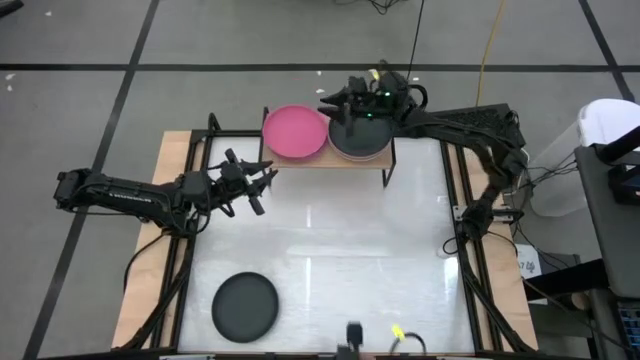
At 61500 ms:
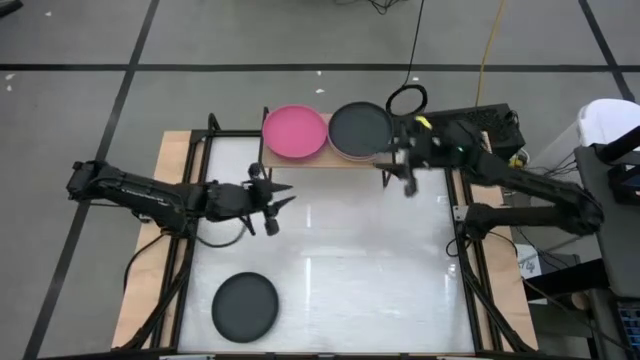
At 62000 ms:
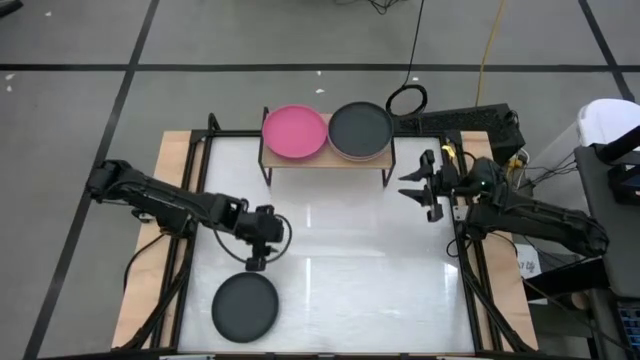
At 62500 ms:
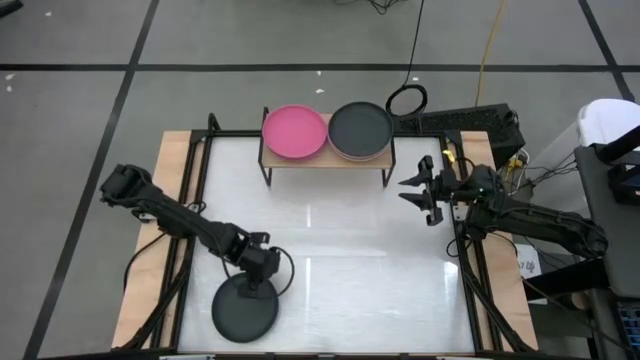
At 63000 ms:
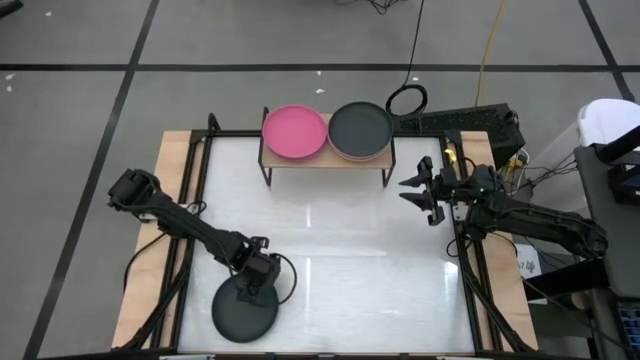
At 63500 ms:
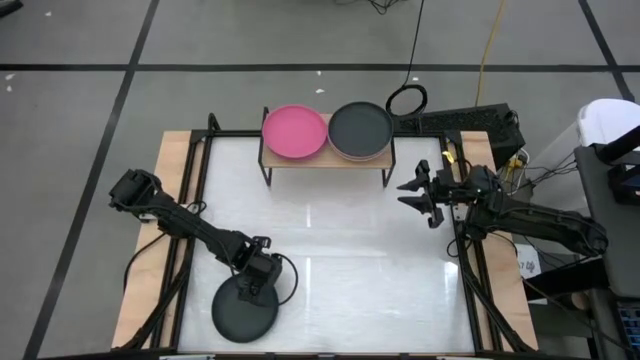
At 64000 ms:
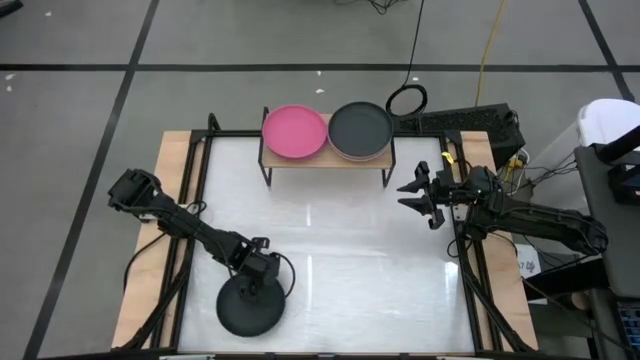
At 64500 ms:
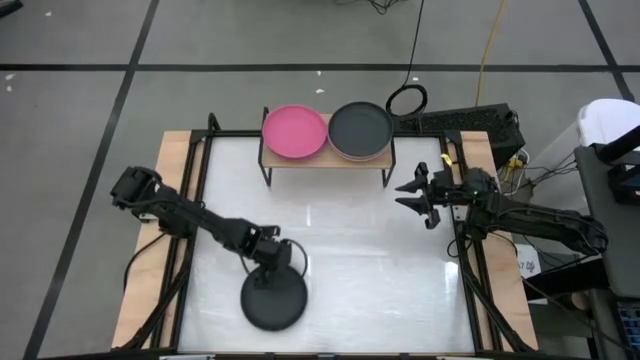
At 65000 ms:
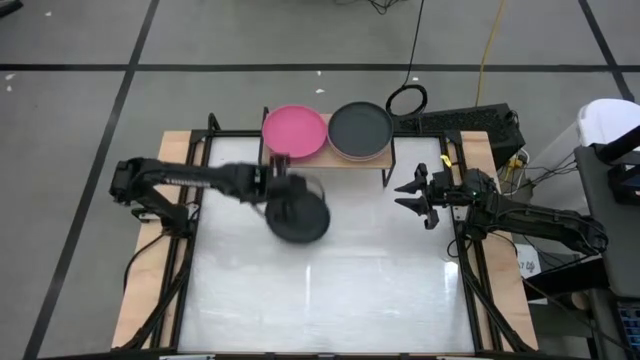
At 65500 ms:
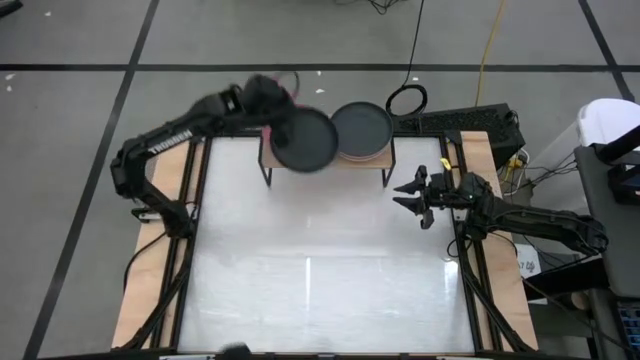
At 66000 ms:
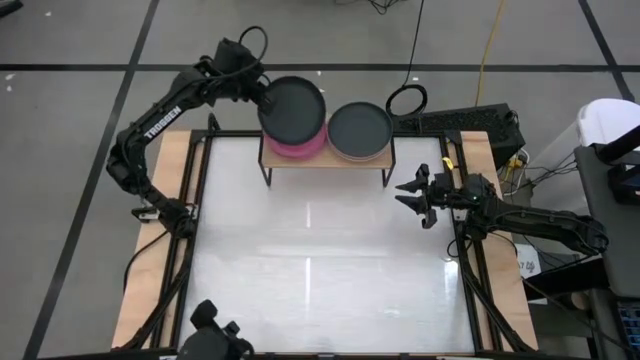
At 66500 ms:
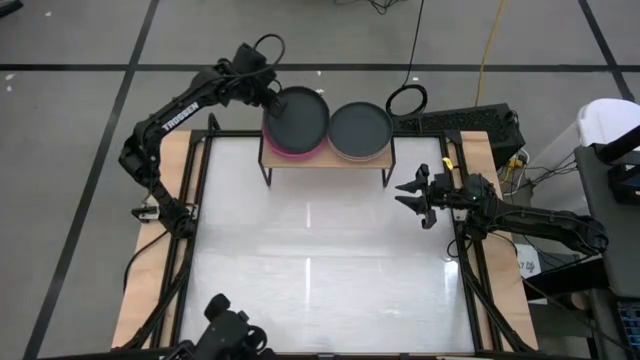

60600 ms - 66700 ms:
Task: Place and stack plates onto a shelf
Stack the black plate on top of the pink plate on the shelf

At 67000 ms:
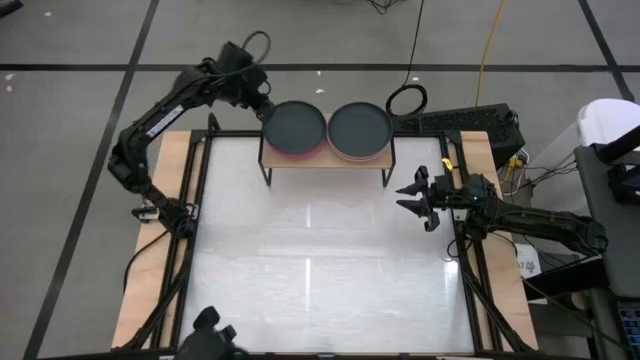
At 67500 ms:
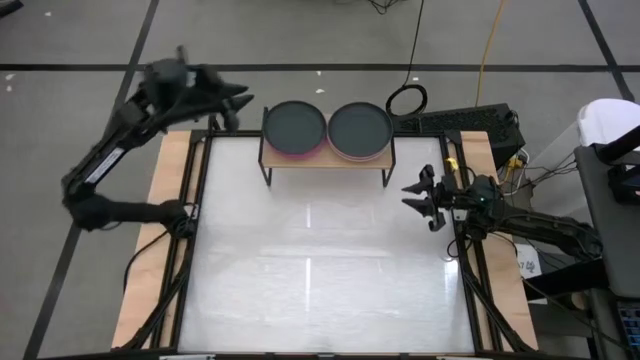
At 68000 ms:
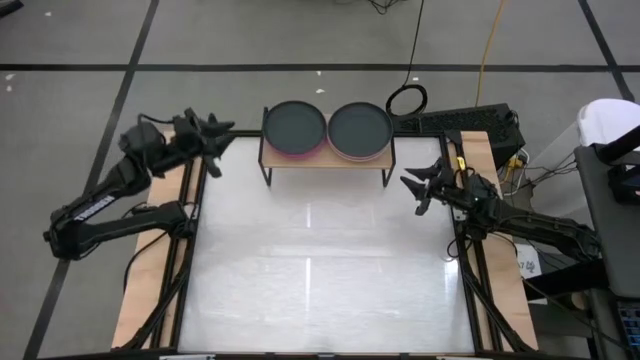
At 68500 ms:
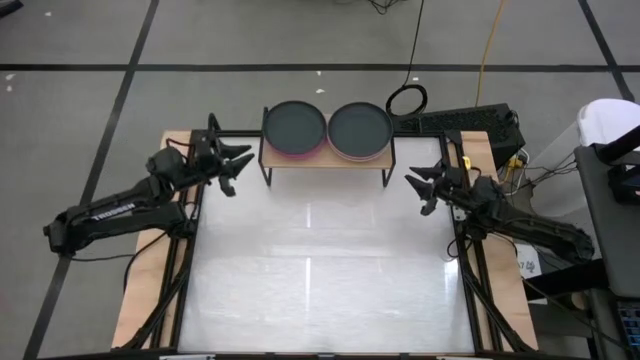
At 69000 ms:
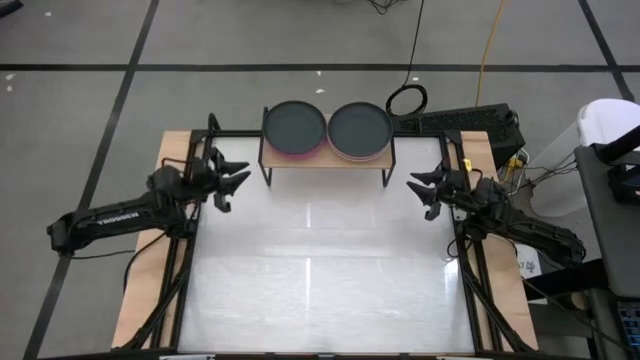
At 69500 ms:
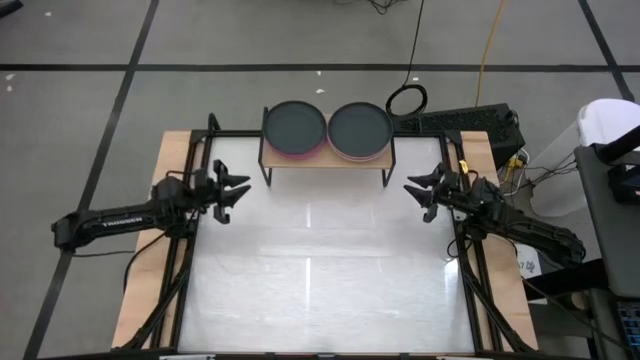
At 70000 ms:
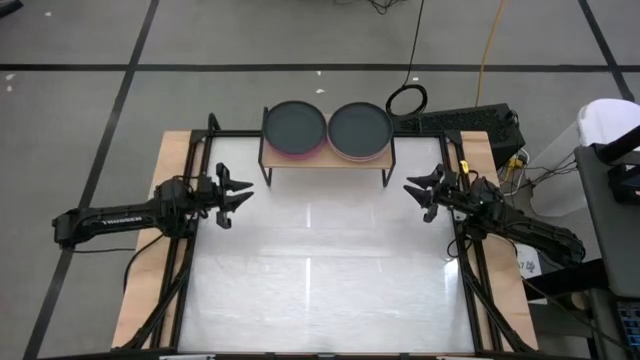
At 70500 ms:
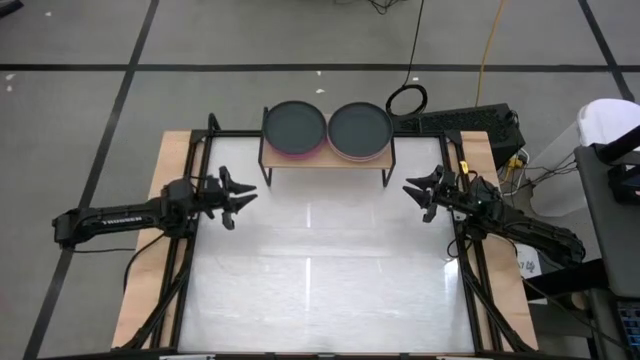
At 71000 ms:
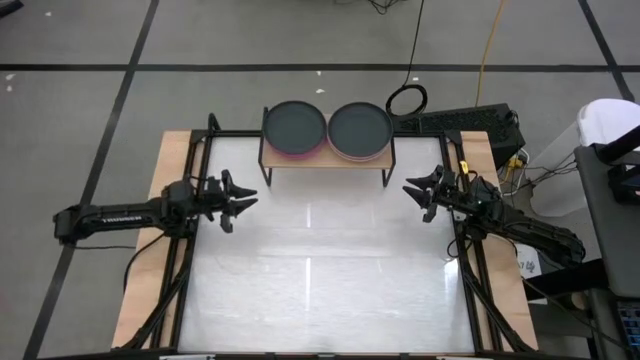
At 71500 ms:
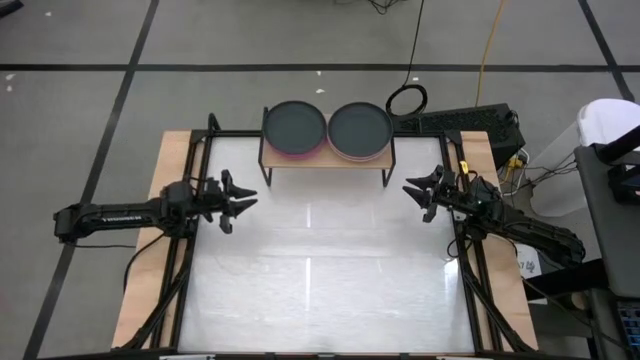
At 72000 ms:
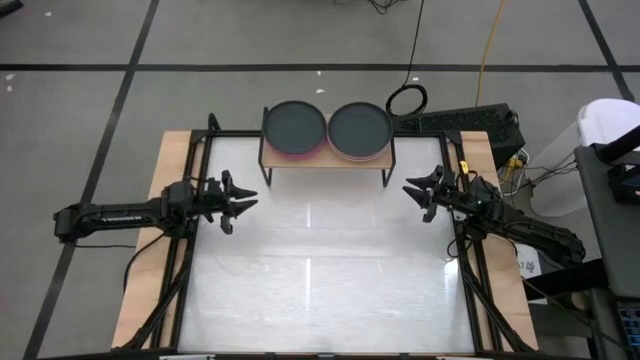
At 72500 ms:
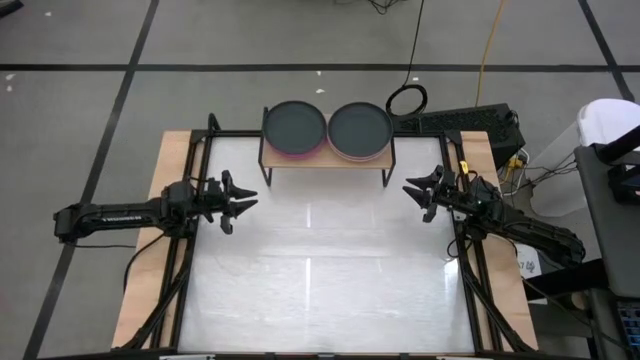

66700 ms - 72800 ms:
Return to Home Position

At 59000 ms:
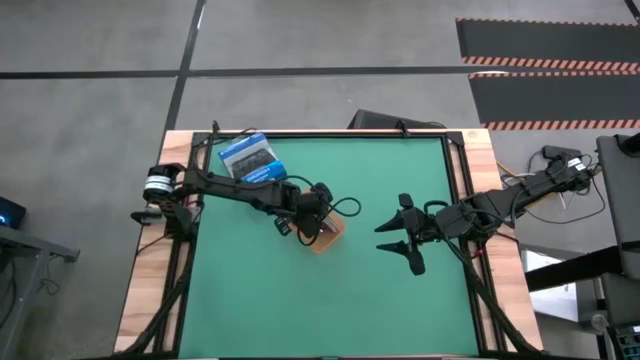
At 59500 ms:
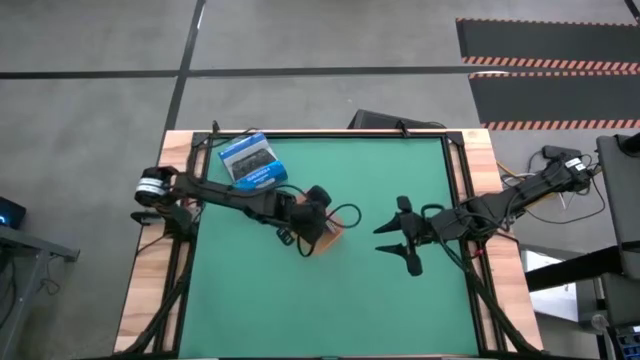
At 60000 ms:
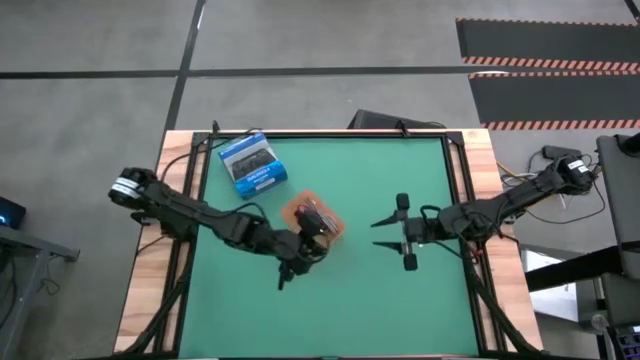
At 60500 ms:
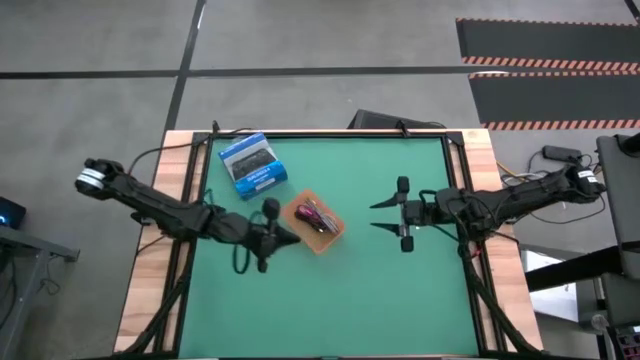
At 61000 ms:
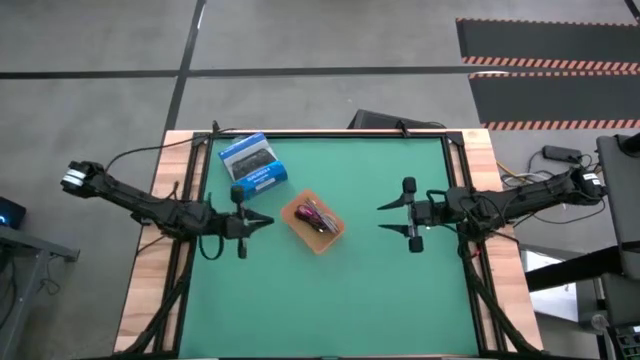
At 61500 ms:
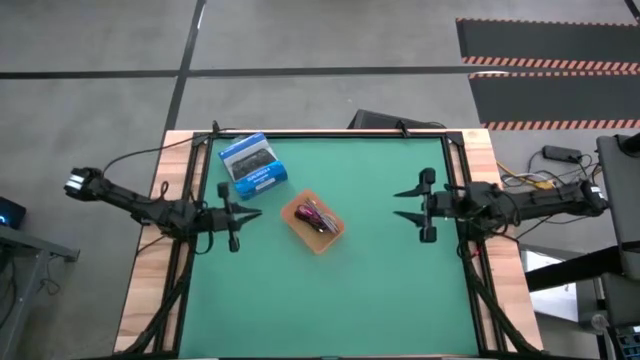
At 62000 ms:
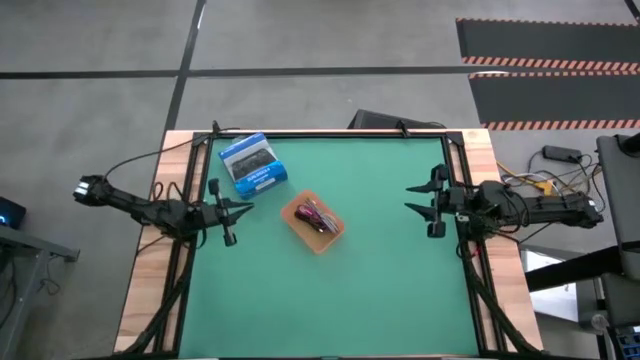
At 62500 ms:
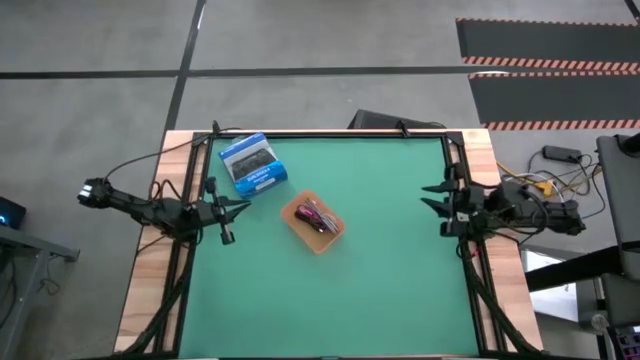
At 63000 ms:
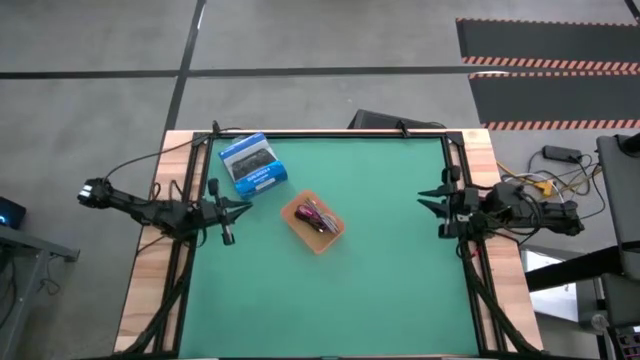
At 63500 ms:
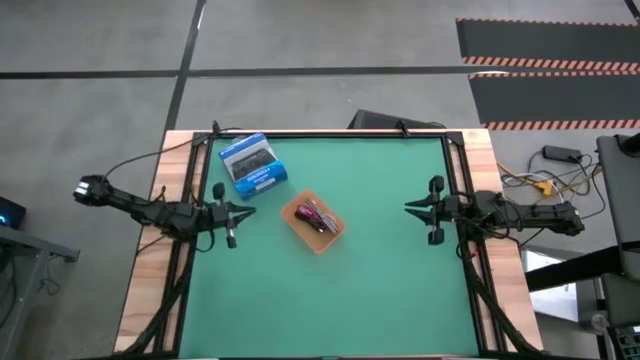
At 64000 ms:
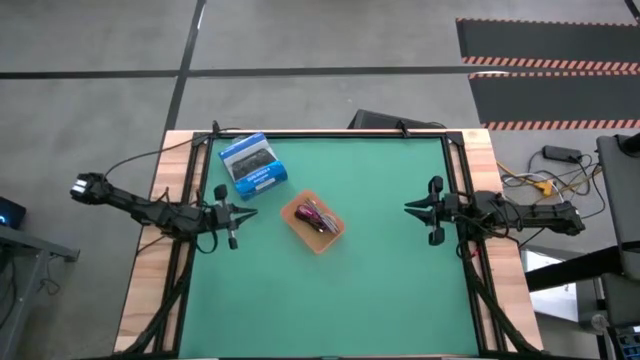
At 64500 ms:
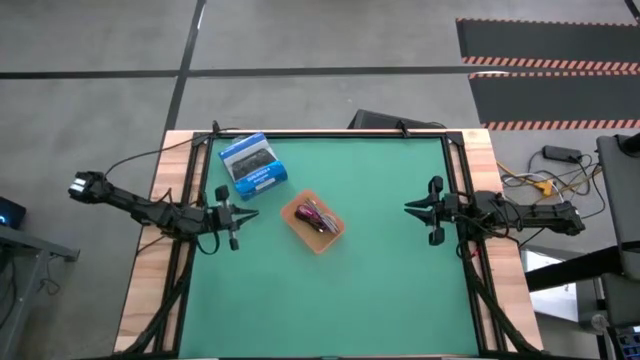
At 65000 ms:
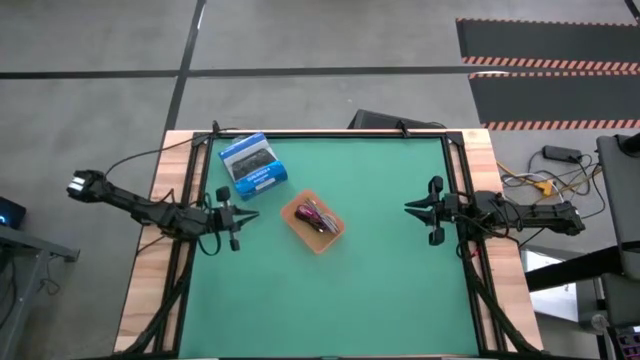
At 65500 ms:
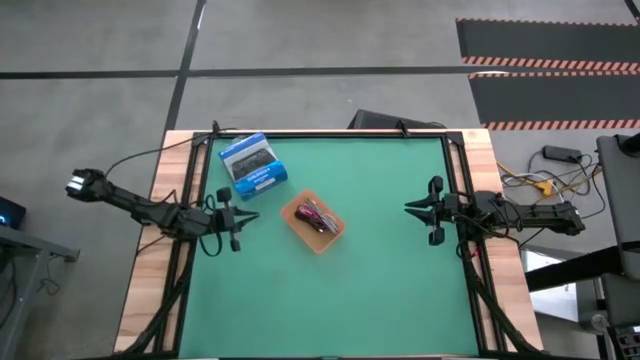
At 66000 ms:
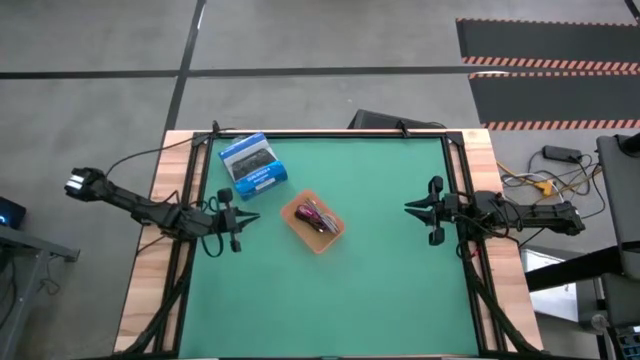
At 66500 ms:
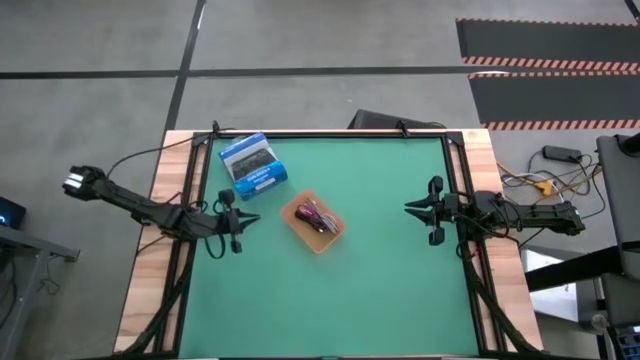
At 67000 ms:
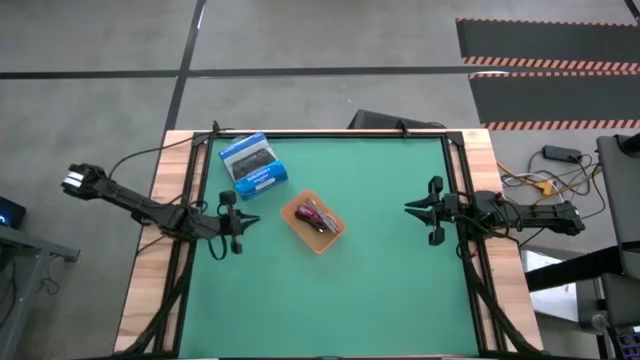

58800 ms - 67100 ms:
Task: Pick and place USB-C Cables
Return to Home Position
